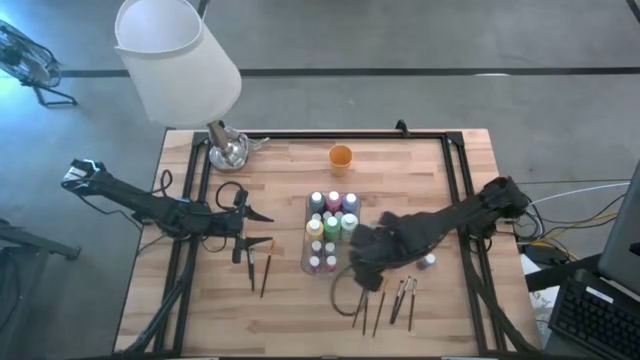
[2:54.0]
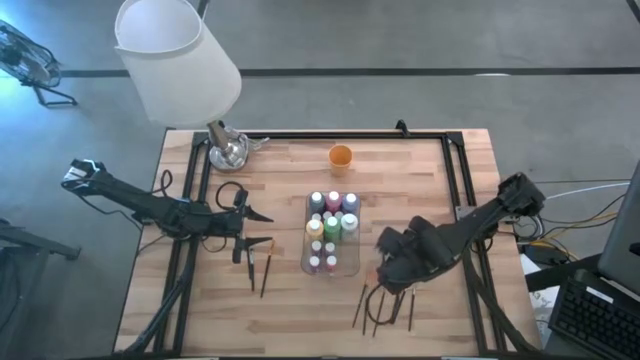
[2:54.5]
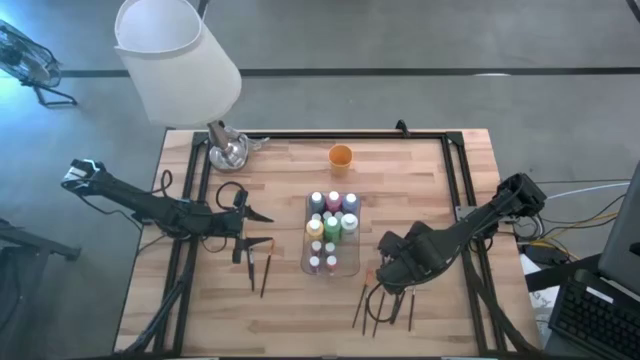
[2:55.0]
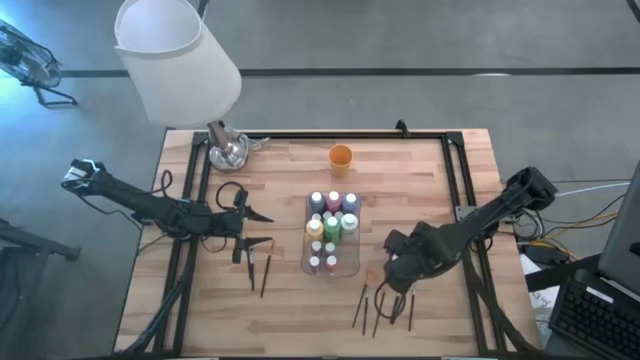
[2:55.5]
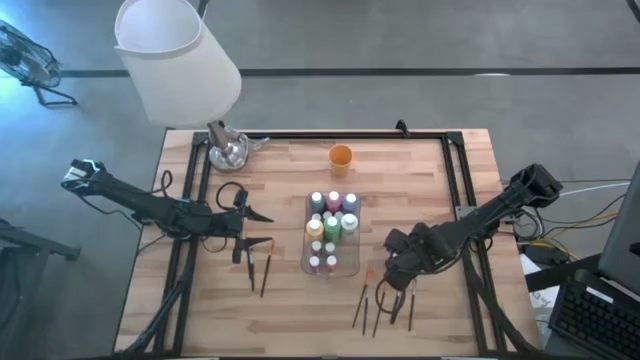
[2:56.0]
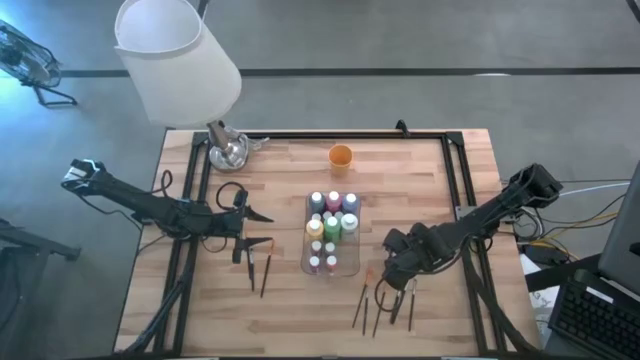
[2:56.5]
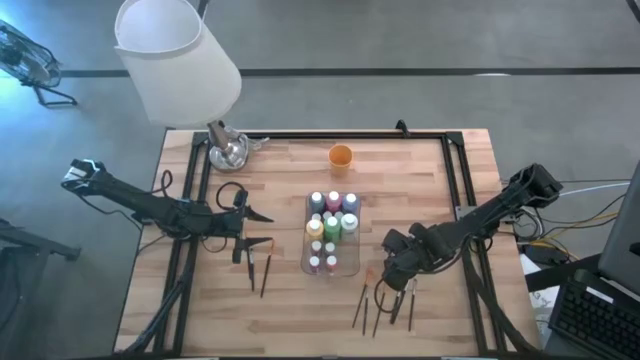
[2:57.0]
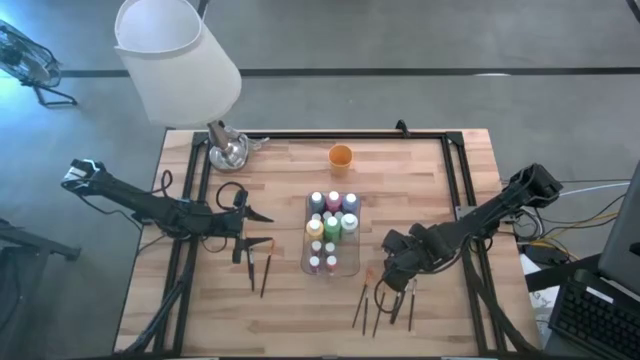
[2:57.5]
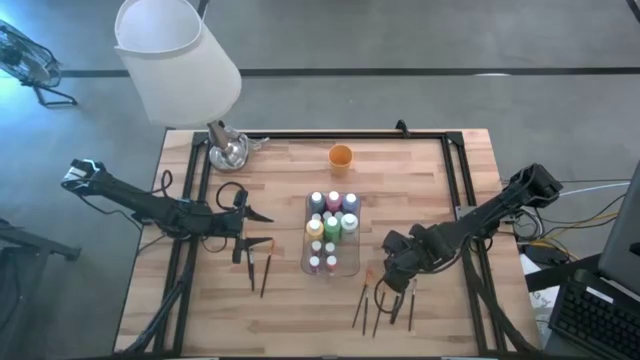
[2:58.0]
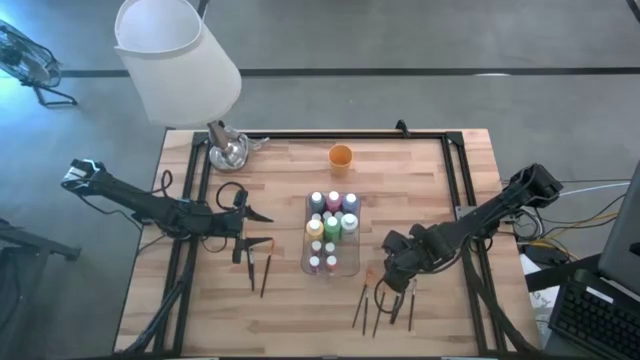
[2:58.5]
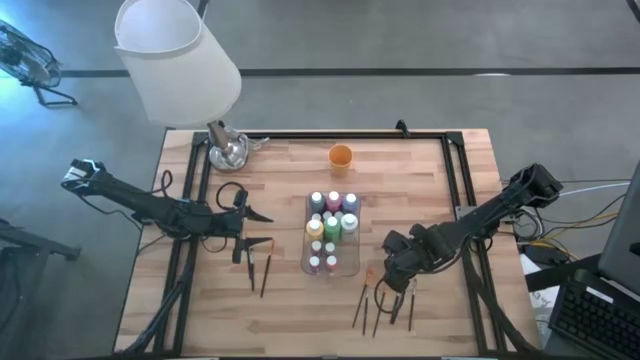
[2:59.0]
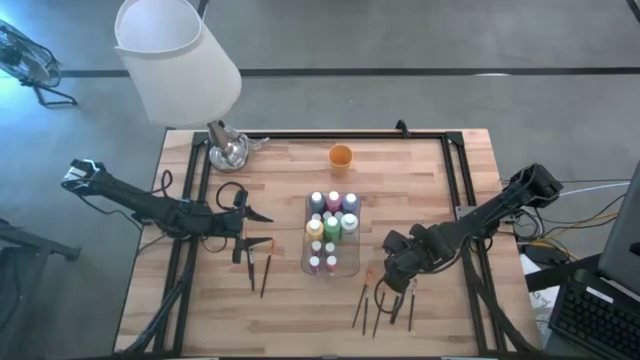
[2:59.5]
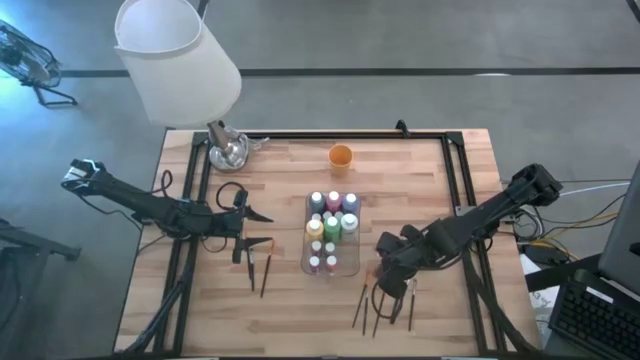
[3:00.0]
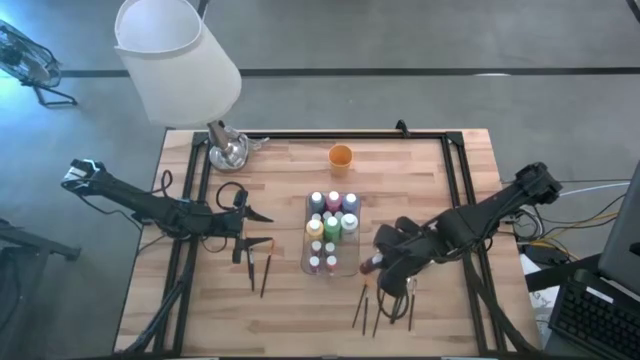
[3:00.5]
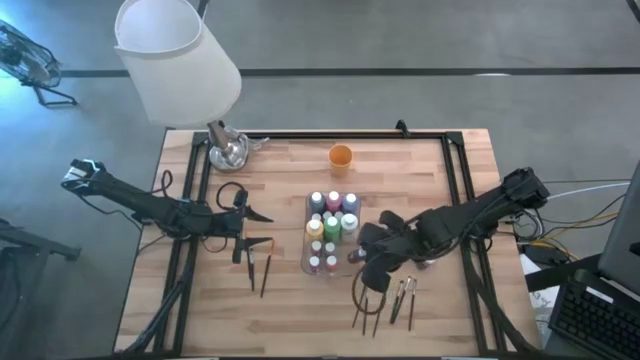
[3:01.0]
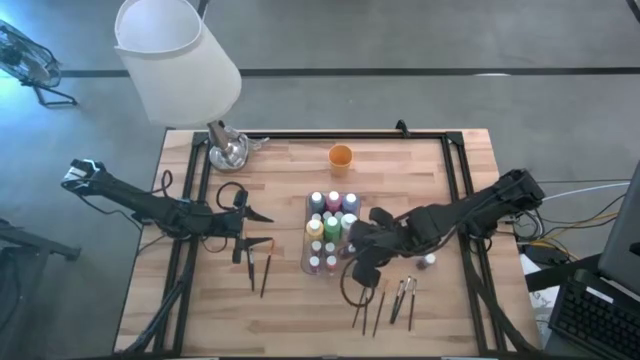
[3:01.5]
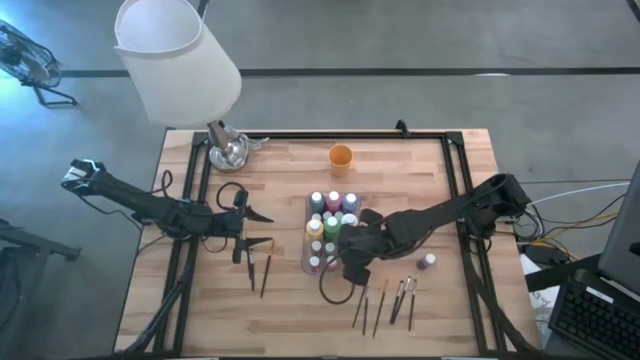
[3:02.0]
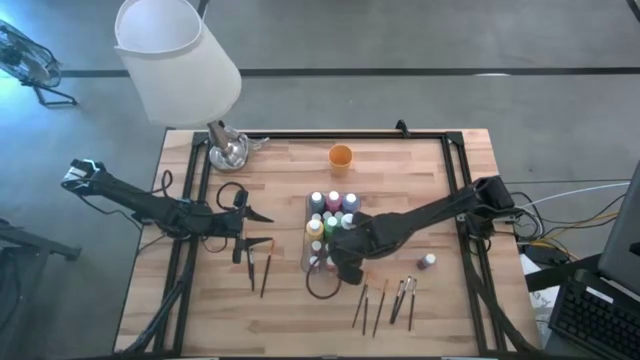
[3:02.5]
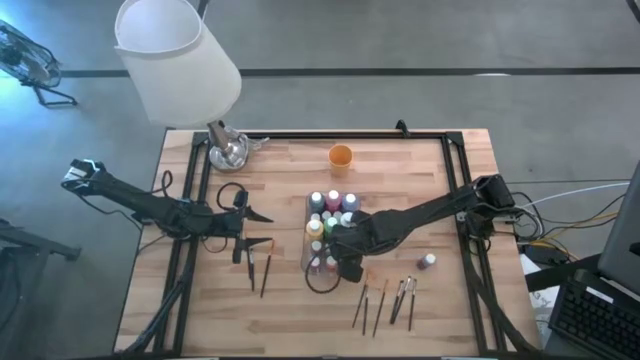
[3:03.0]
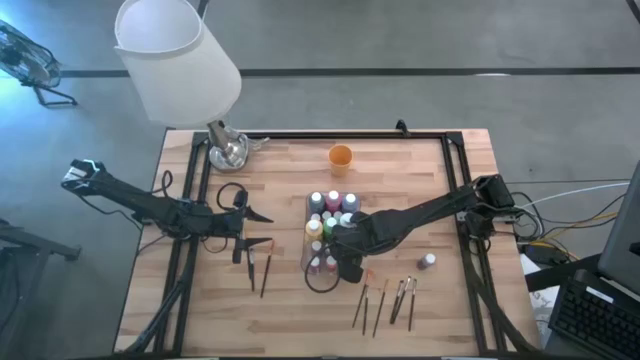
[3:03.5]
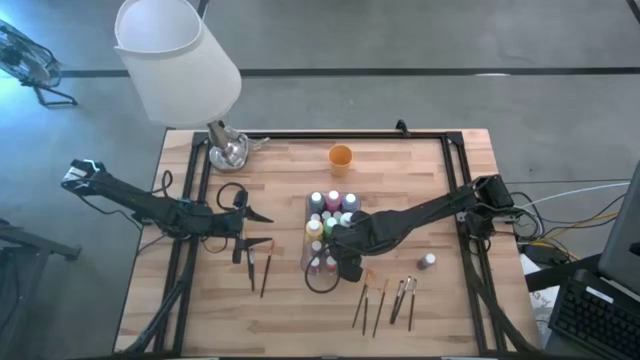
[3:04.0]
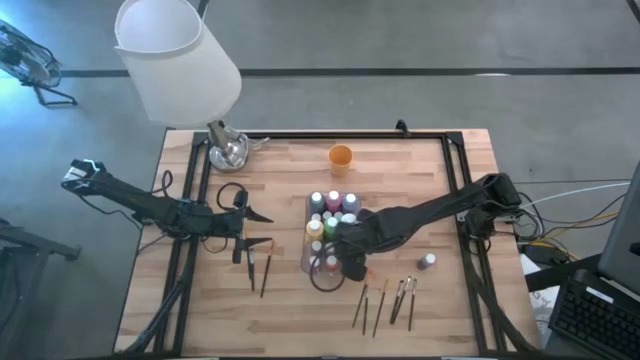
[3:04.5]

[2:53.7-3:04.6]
Task: Pick & Place Paint Supplies
Put the black paint bottle into the transparent bin

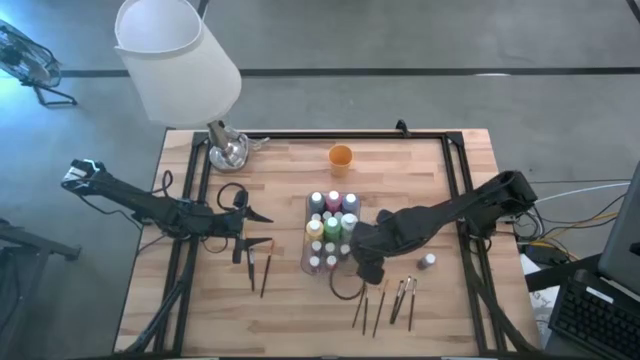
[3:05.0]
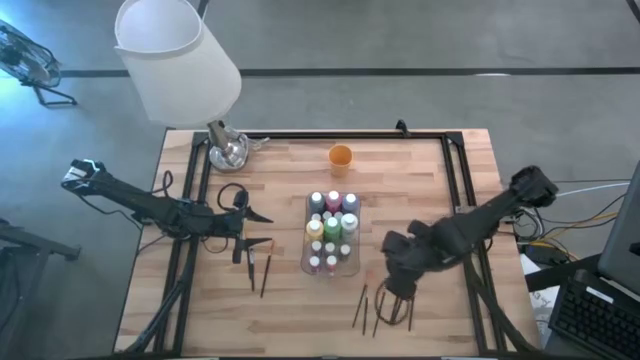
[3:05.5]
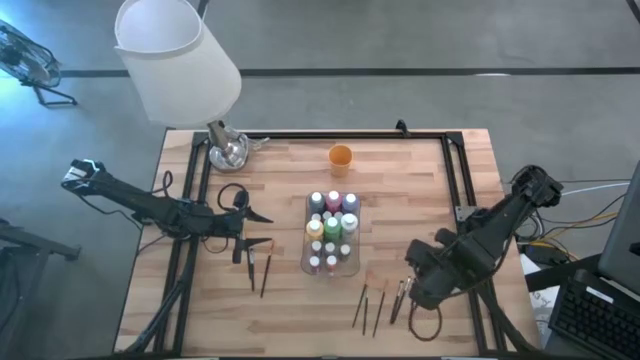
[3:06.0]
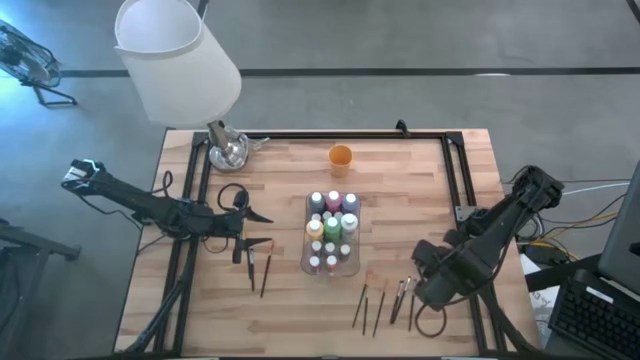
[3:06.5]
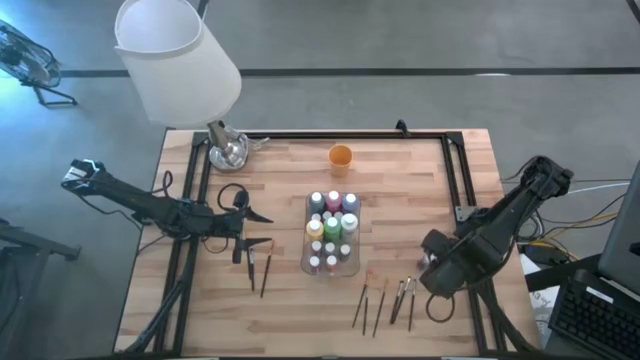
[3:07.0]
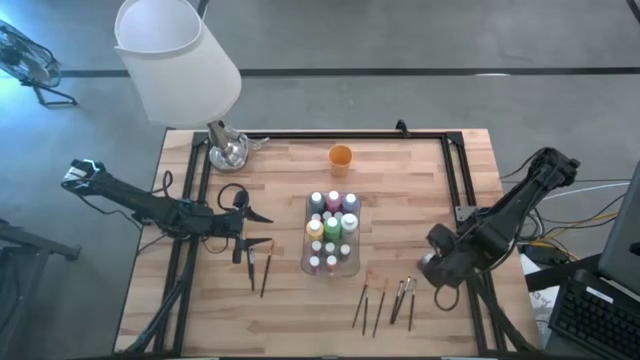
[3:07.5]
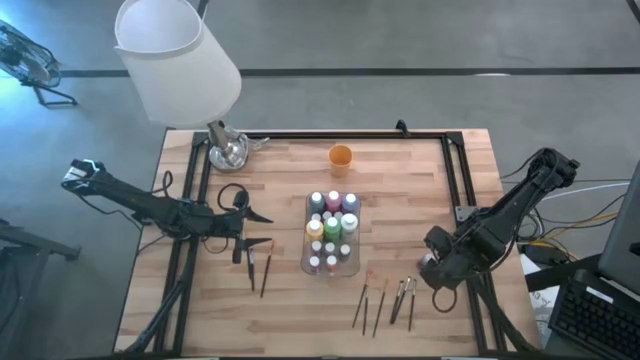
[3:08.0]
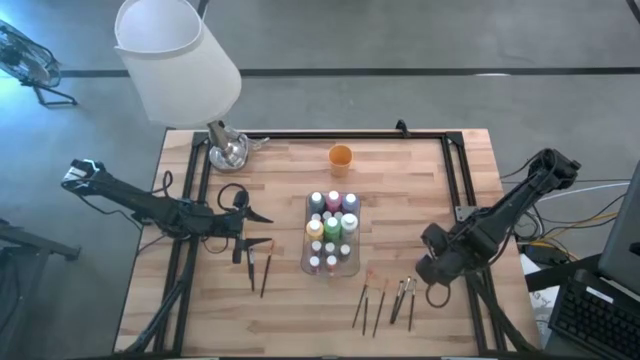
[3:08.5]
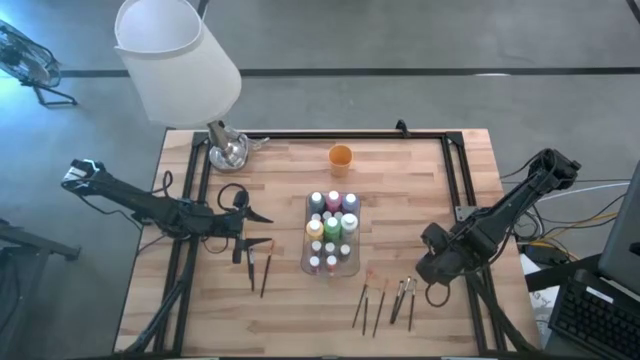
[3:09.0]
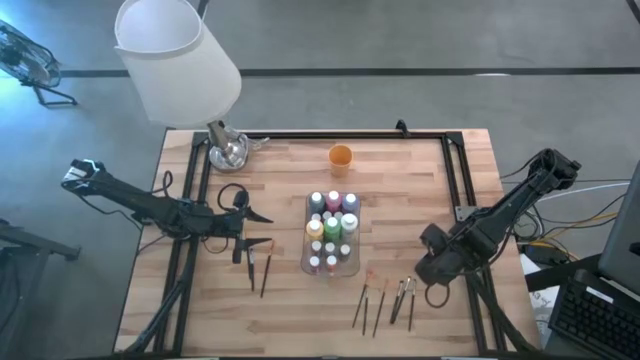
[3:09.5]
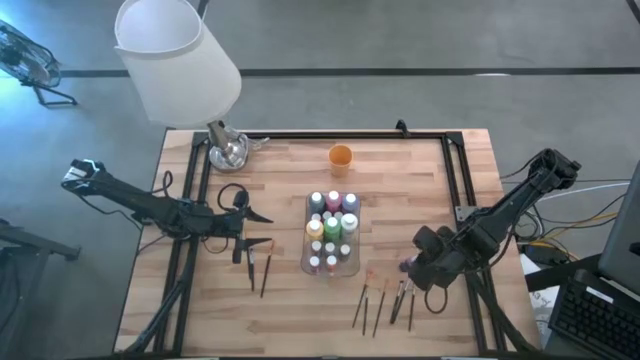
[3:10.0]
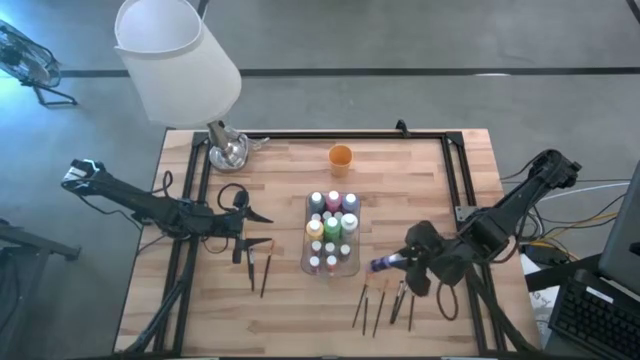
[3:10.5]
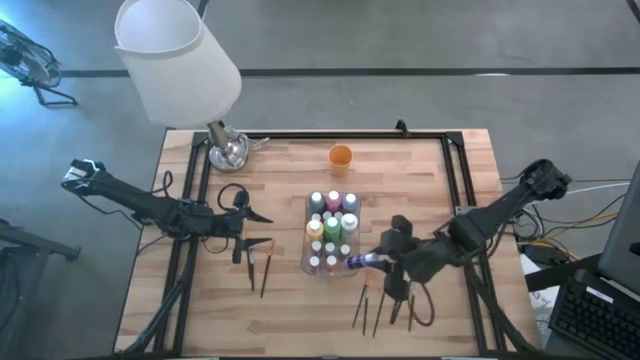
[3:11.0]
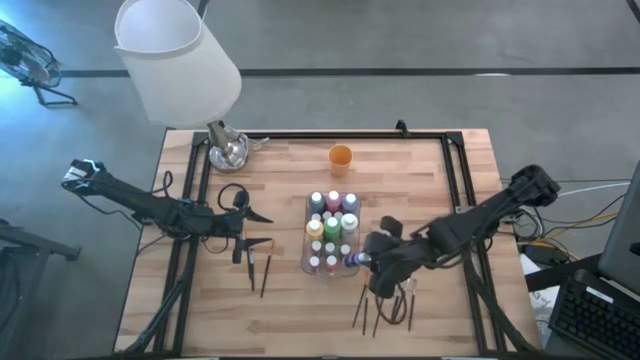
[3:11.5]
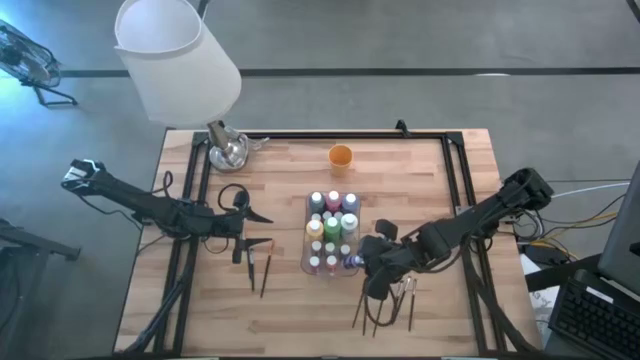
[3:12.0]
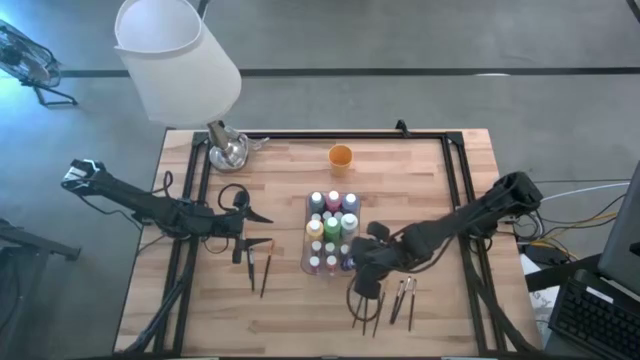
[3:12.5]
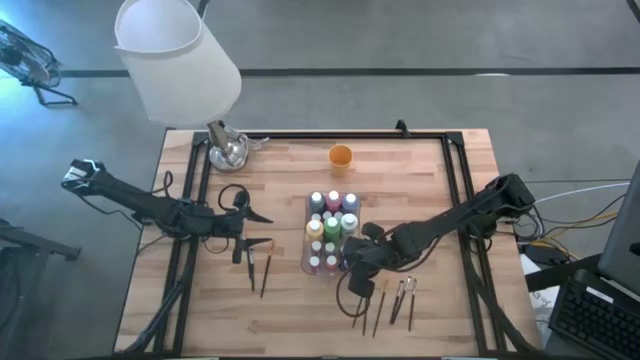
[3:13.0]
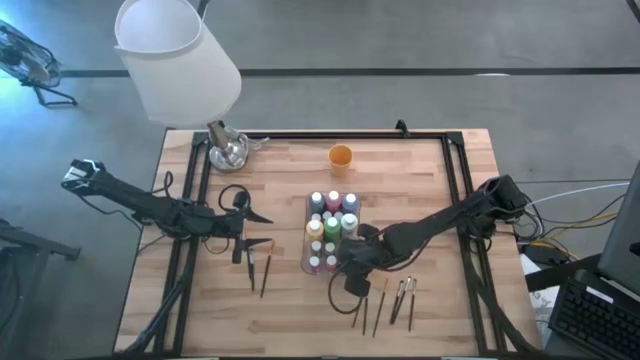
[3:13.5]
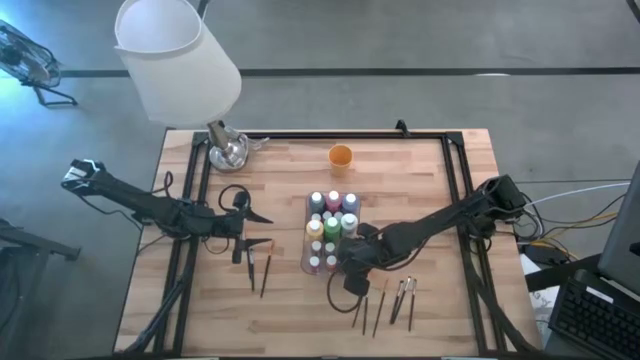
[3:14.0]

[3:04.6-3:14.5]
Put the purple paint bottle into the transparent bin

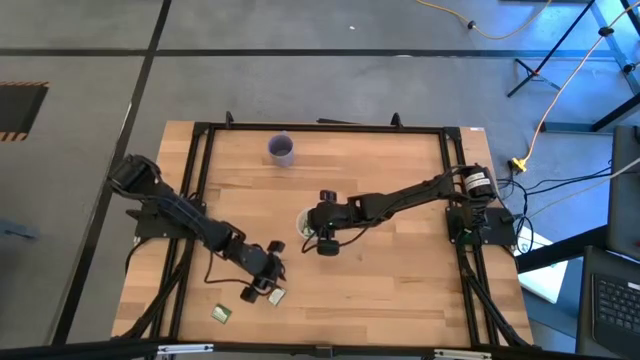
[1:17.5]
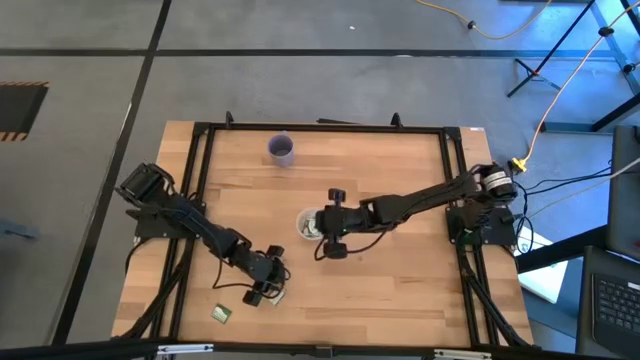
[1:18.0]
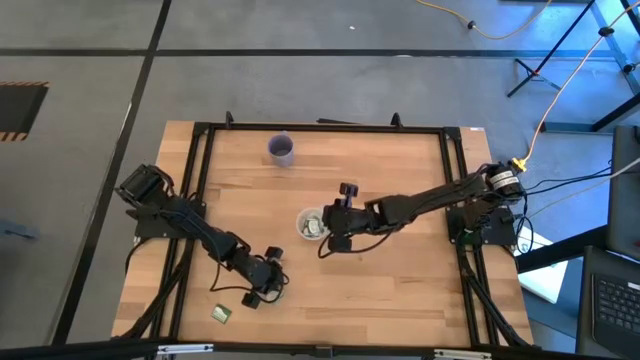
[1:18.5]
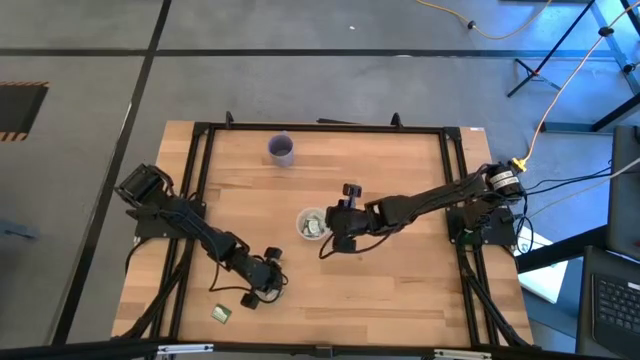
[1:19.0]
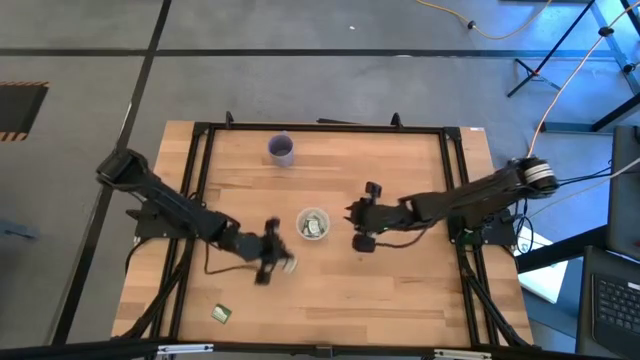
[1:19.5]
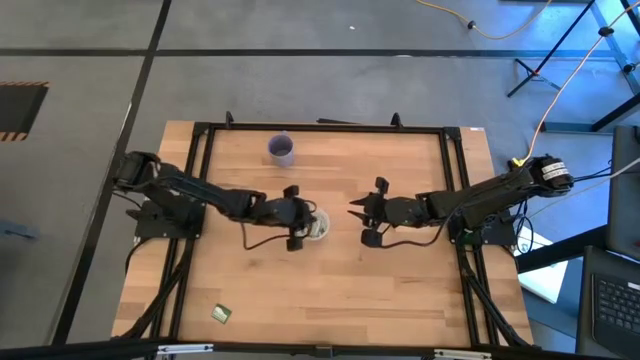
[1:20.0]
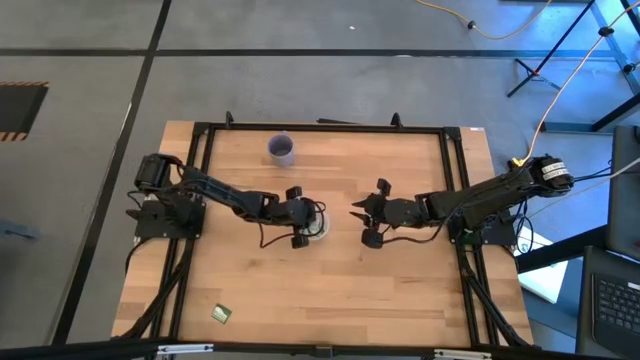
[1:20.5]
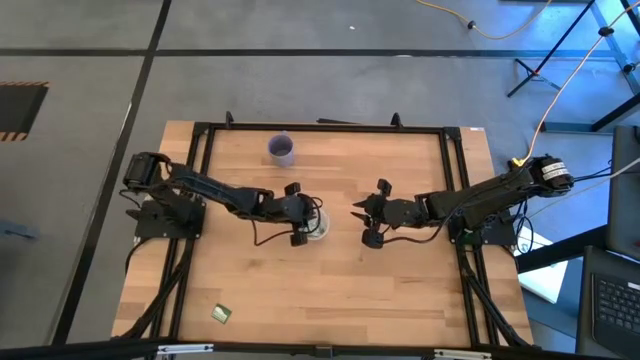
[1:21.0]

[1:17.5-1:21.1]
Task: Pick and place Stevia / Truvia into bins
Put the truvia packet into the transparent container
